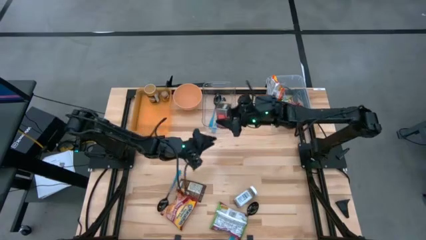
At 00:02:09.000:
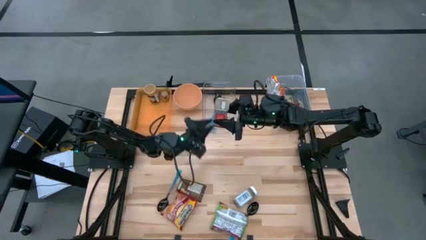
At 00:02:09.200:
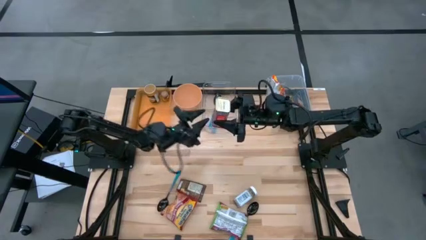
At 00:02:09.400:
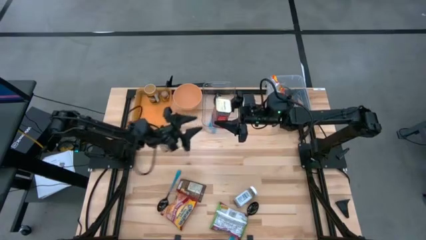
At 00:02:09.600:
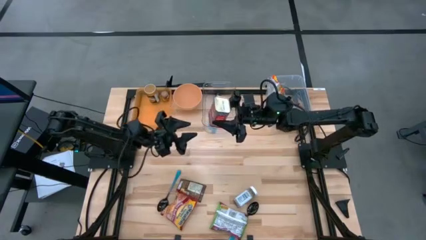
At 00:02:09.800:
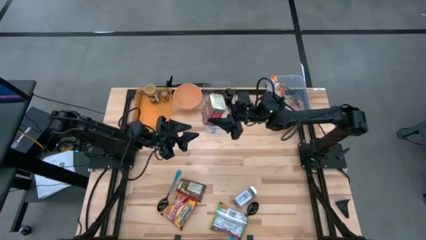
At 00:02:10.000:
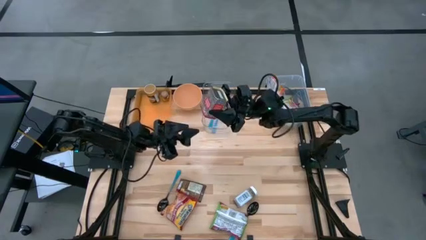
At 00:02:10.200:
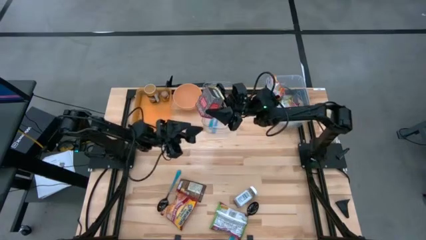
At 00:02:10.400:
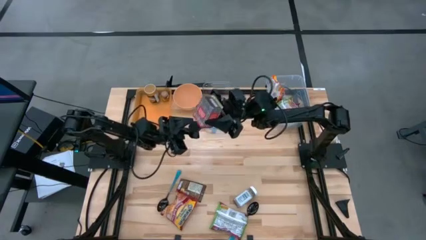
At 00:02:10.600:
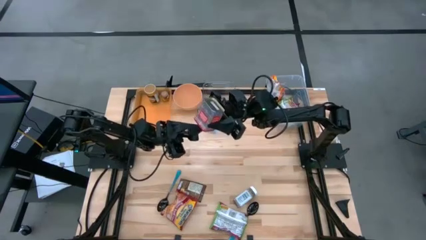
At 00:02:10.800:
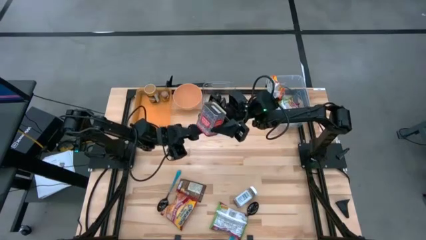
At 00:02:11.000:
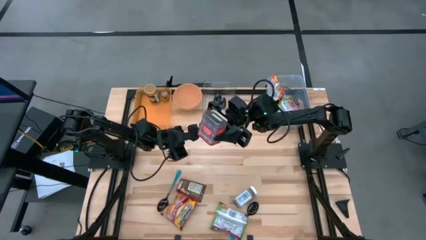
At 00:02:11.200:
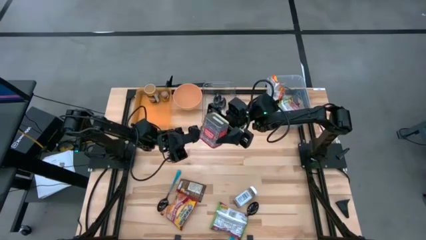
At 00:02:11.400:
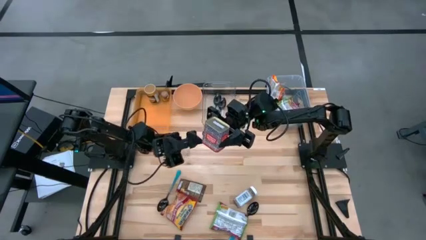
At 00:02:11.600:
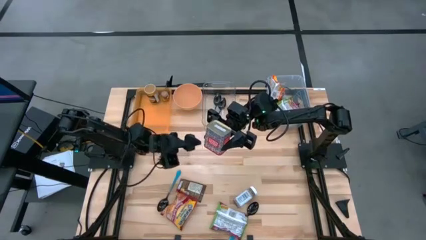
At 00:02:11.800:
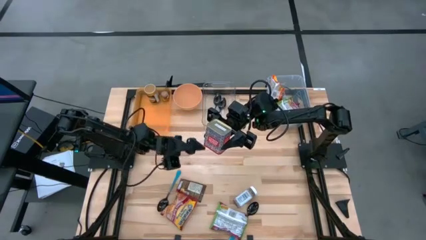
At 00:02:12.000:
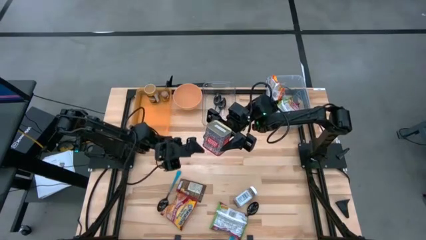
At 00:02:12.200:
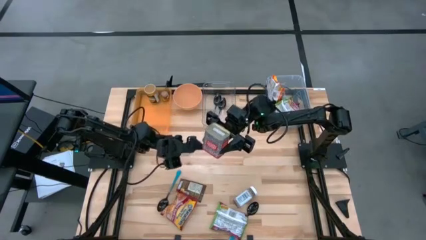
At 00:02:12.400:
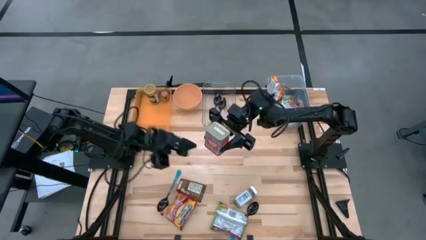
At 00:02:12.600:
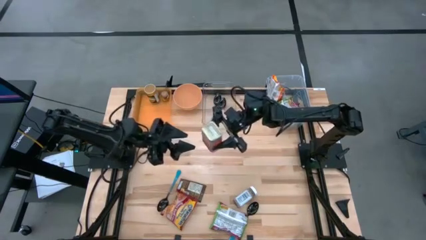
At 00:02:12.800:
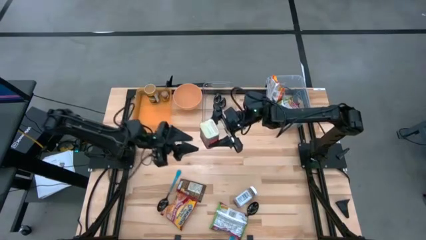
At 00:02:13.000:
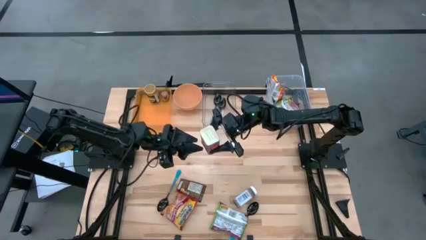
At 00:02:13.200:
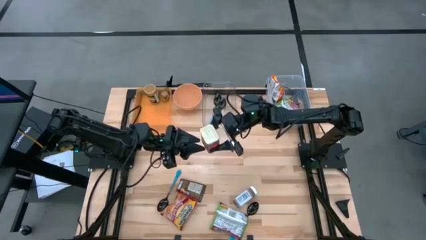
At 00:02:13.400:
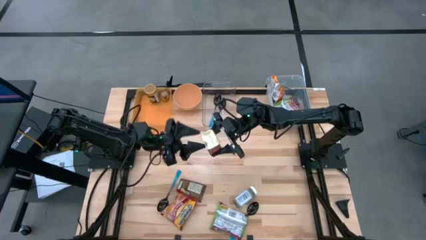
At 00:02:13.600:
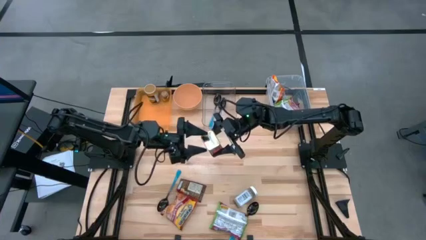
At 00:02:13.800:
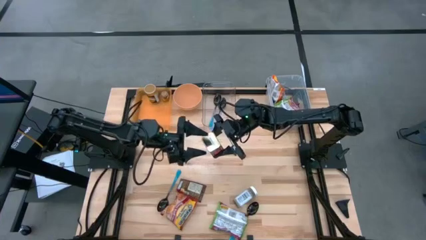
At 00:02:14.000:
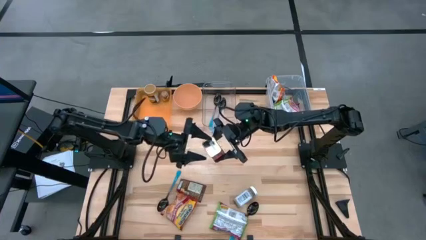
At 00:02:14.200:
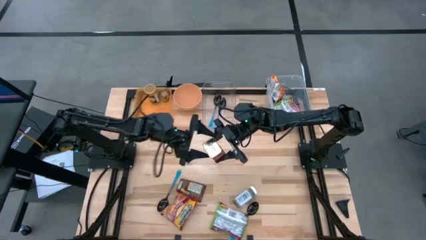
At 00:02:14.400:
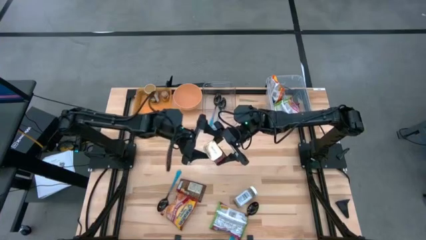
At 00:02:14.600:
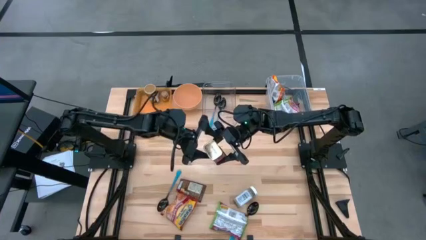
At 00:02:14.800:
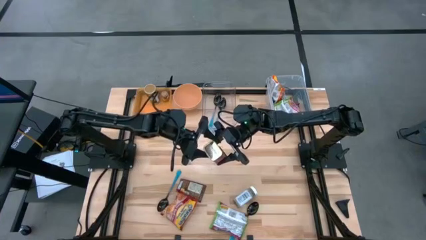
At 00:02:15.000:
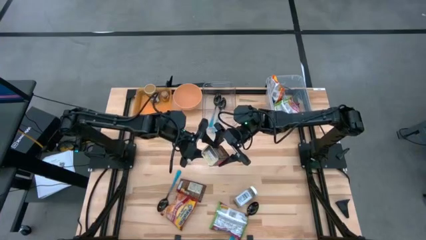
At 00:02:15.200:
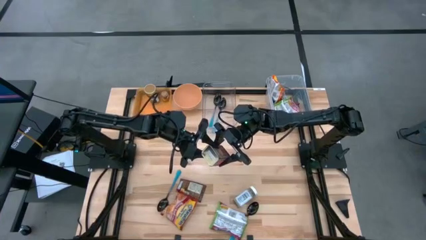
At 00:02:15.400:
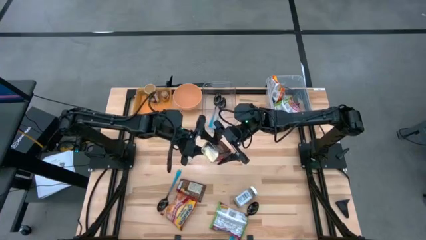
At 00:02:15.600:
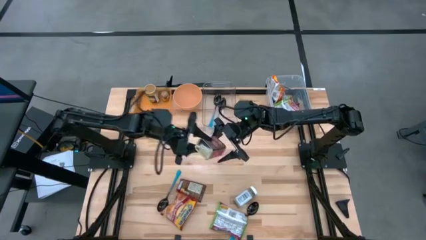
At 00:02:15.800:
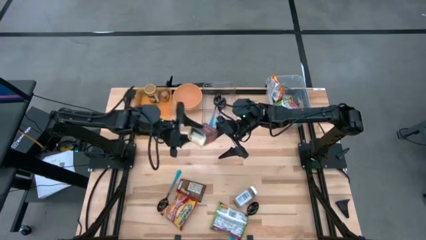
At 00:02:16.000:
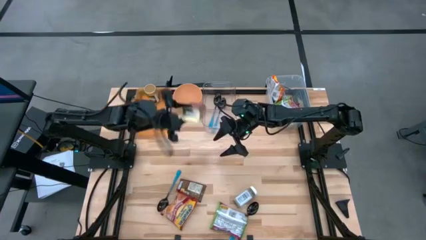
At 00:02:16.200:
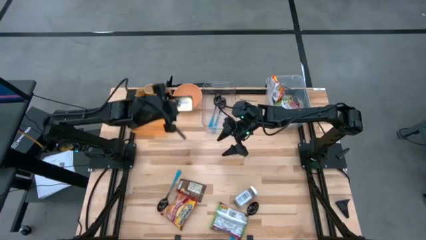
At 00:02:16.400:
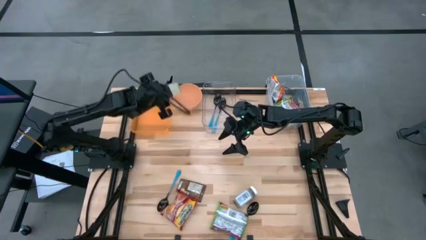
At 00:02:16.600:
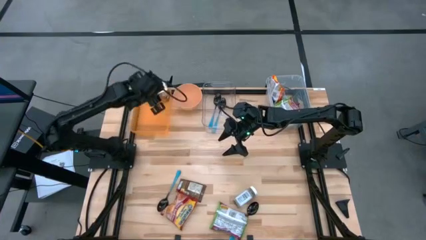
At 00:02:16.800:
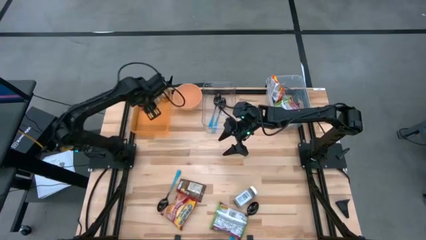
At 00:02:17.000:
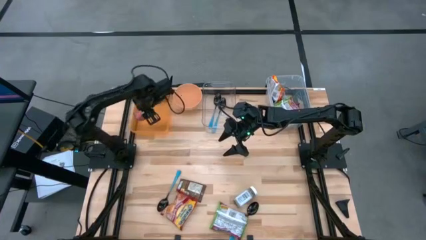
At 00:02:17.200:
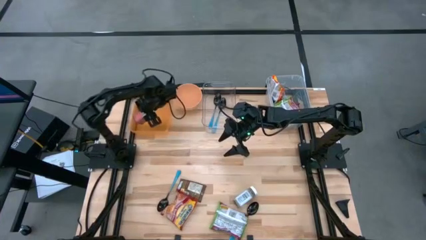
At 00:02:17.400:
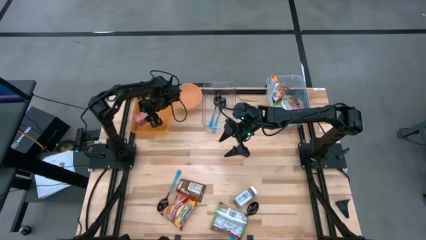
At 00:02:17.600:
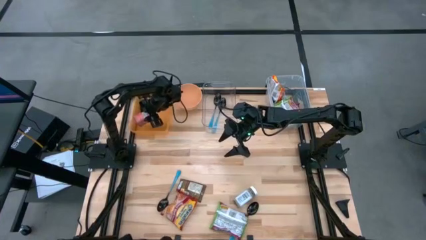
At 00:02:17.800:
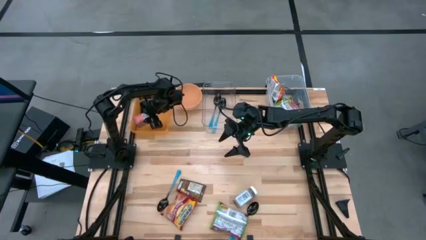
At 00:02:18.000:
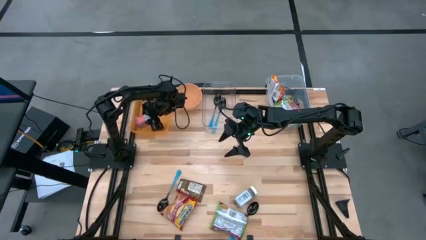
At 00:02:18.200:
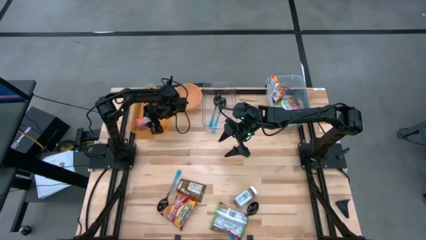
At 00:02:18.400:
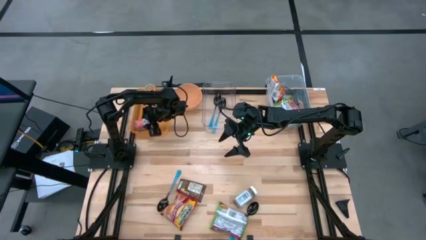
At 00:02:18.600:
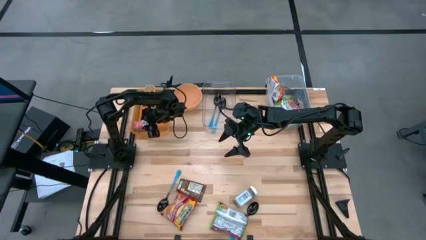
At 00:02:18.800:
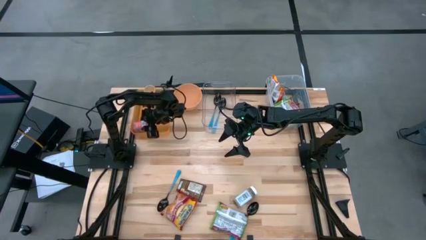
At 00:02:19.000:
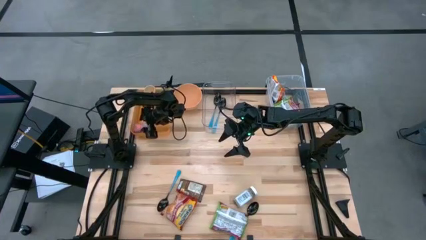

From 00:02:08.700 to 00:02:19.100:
Task: Pick & Place Food Item
Put the red seasoning can into the orange bin
